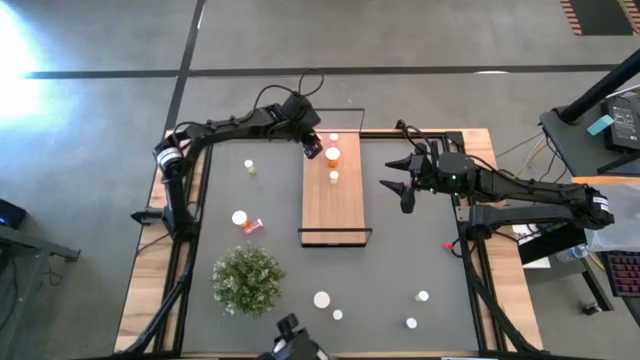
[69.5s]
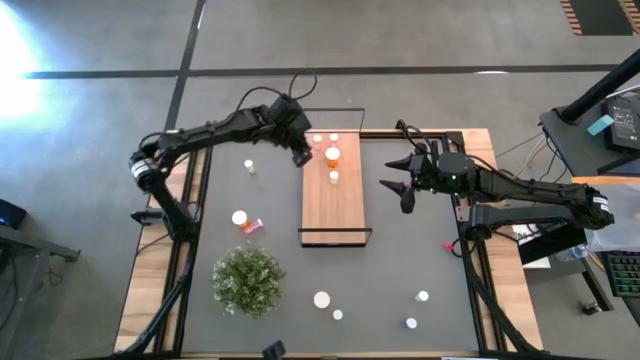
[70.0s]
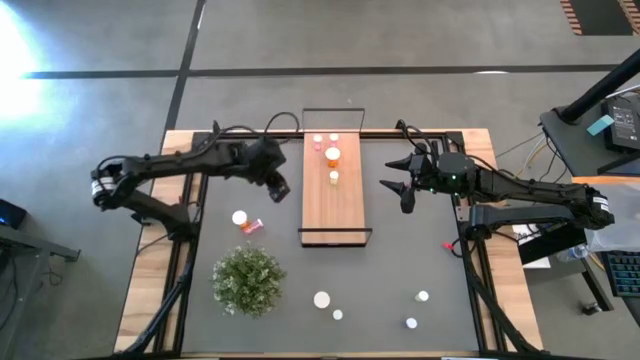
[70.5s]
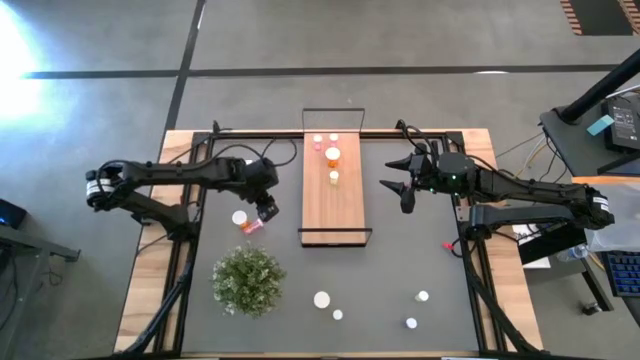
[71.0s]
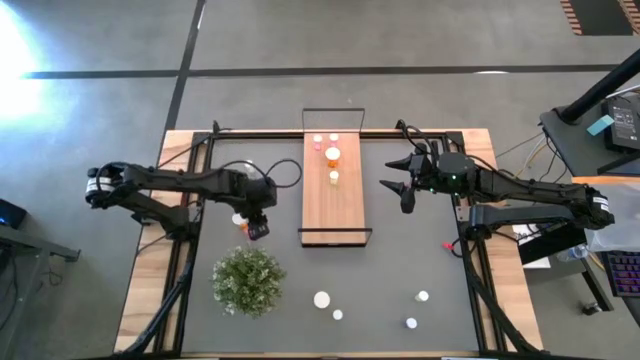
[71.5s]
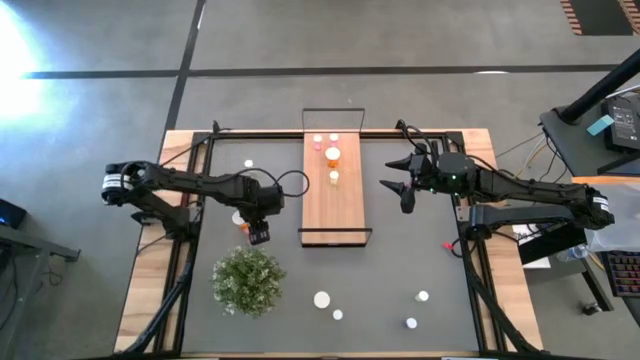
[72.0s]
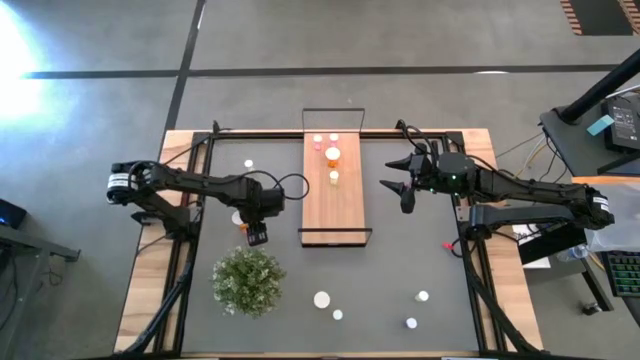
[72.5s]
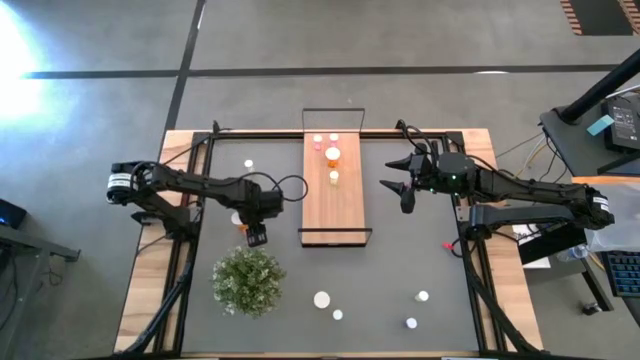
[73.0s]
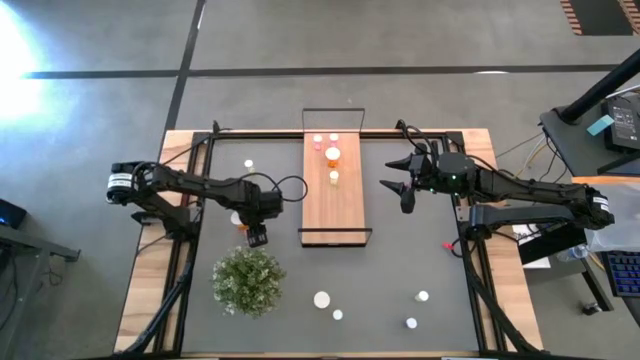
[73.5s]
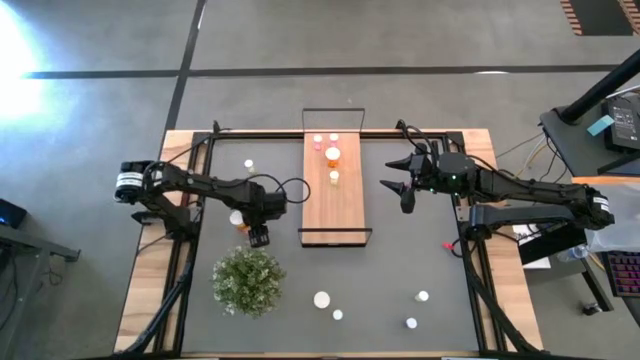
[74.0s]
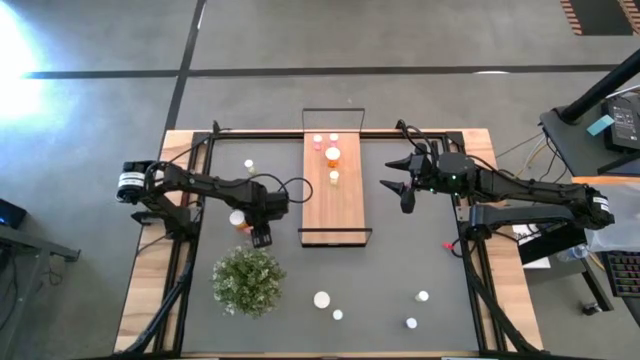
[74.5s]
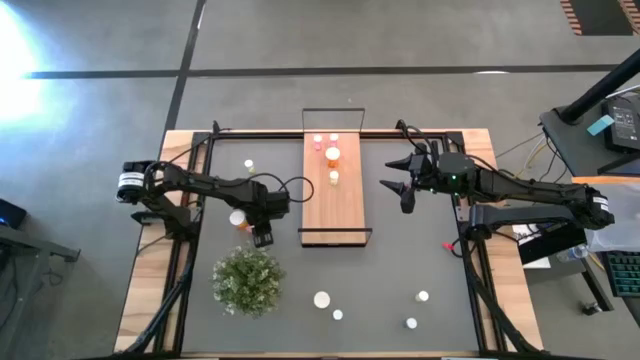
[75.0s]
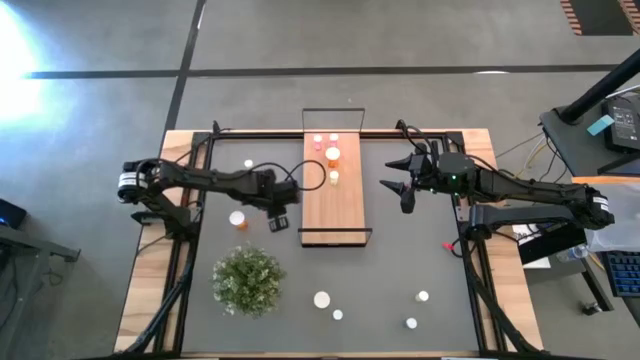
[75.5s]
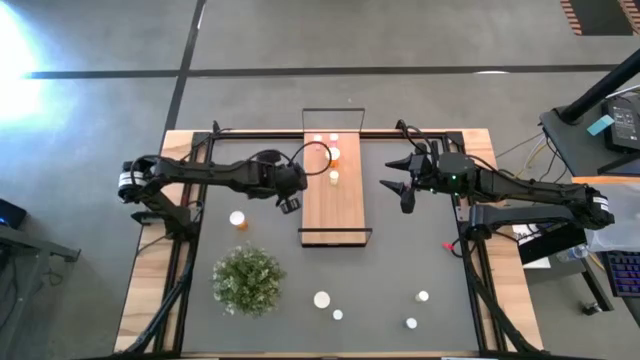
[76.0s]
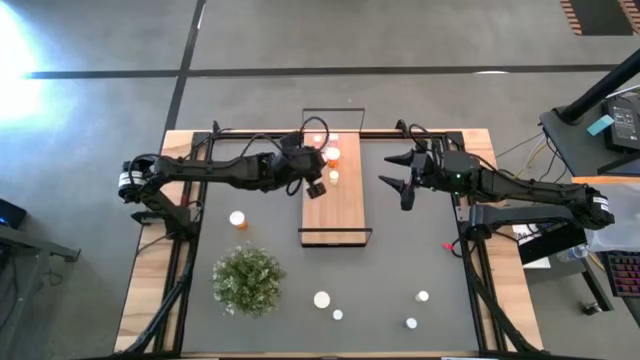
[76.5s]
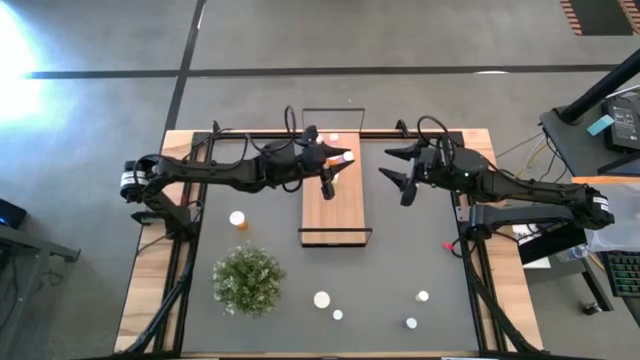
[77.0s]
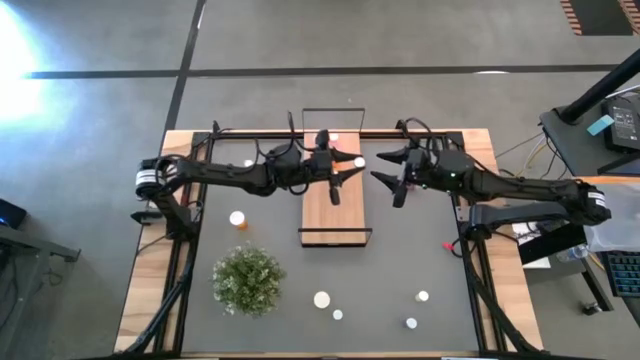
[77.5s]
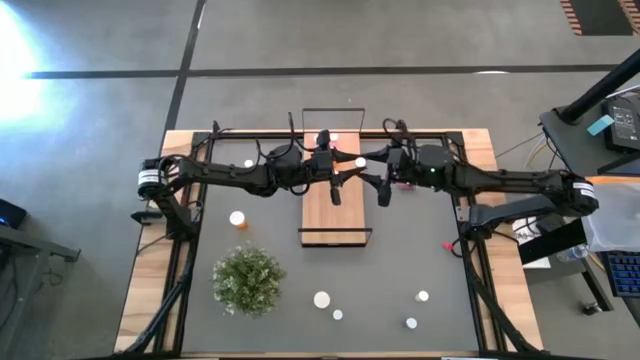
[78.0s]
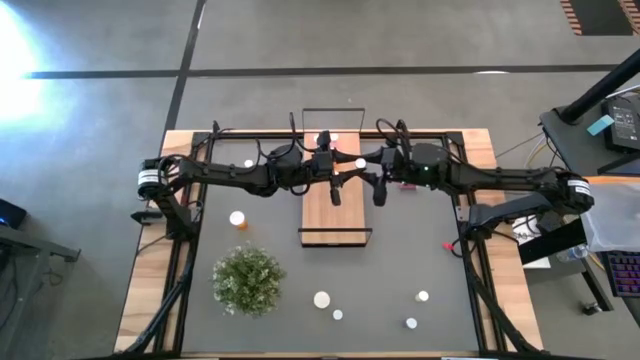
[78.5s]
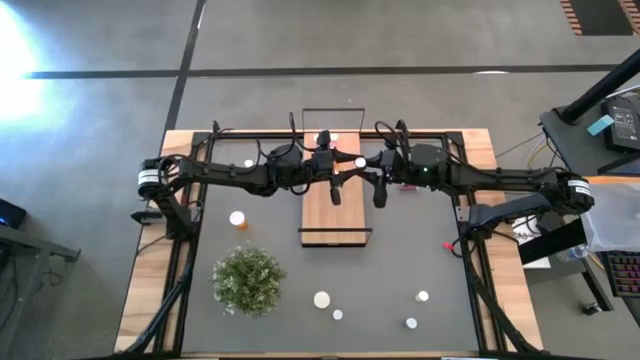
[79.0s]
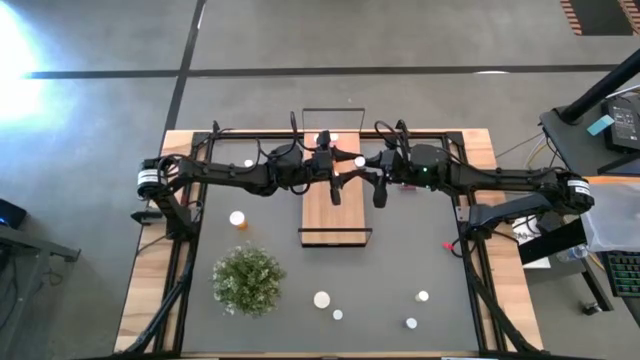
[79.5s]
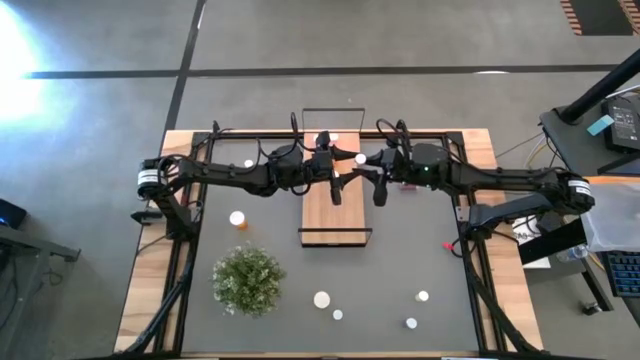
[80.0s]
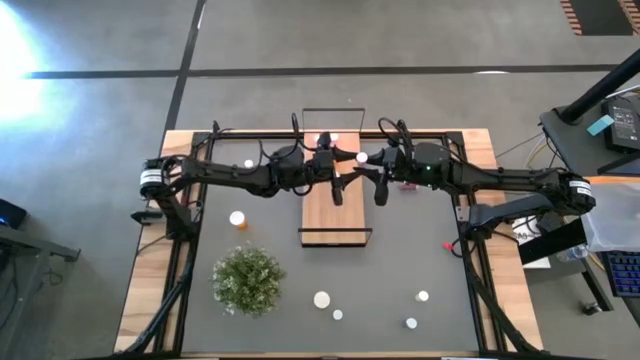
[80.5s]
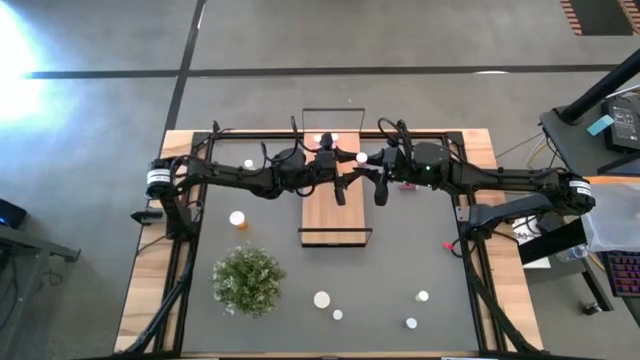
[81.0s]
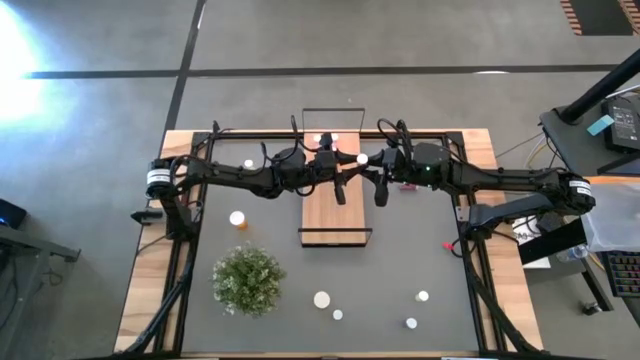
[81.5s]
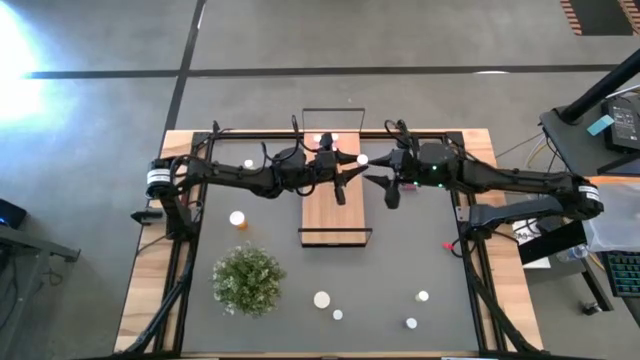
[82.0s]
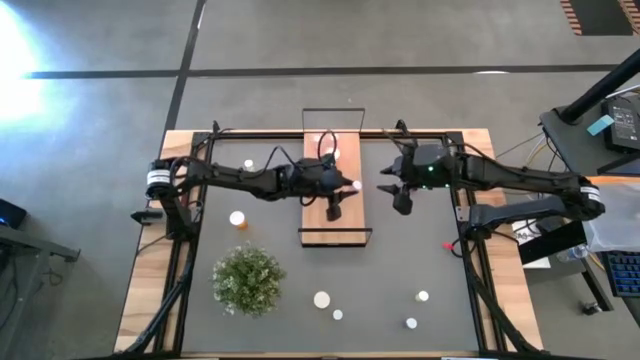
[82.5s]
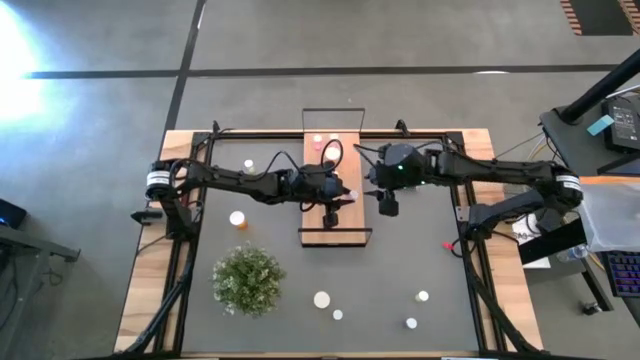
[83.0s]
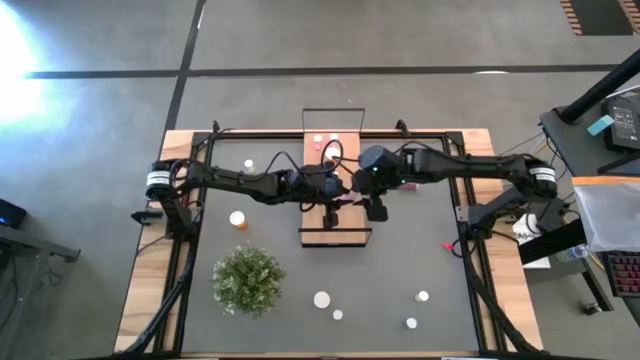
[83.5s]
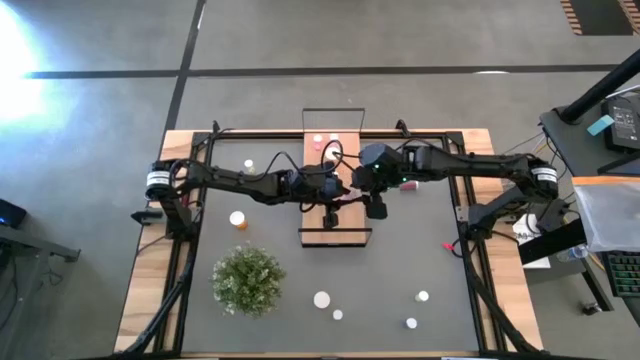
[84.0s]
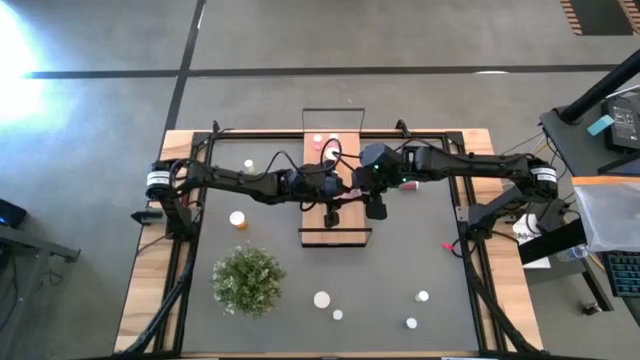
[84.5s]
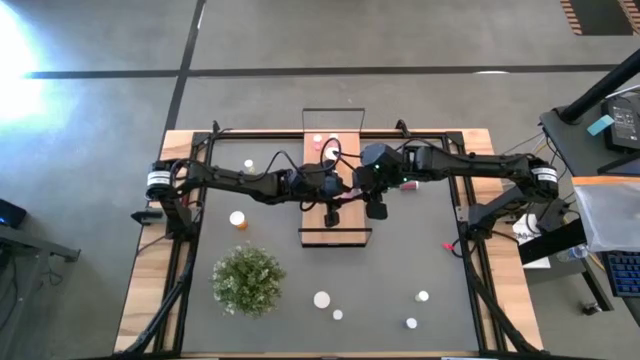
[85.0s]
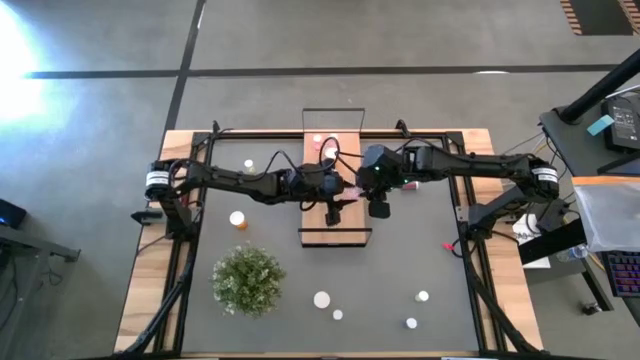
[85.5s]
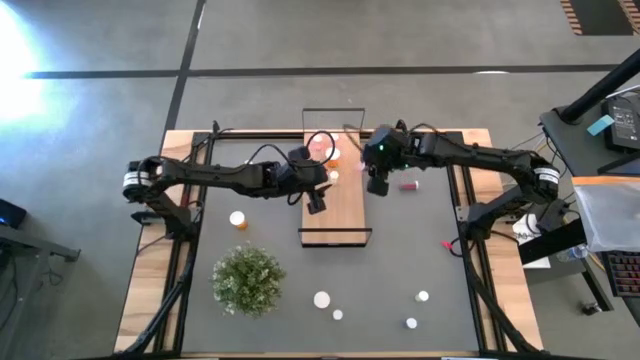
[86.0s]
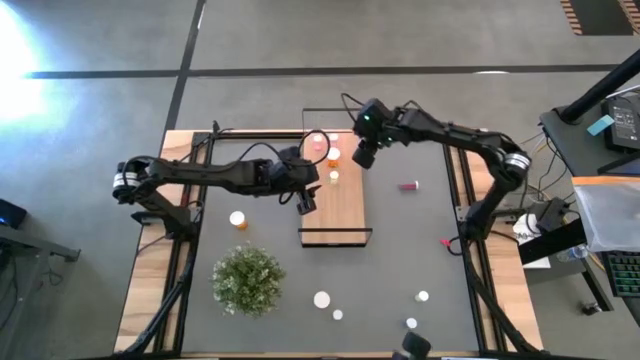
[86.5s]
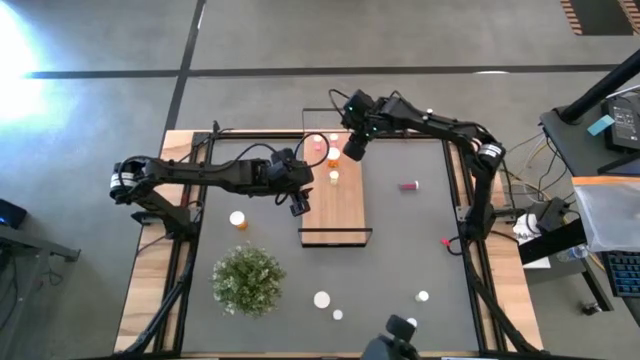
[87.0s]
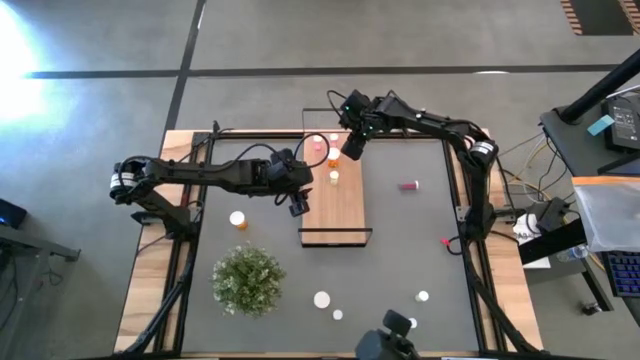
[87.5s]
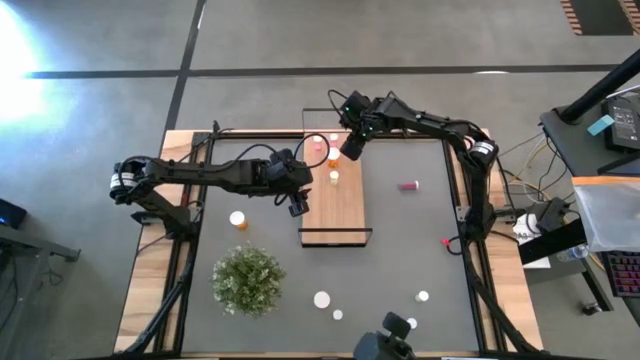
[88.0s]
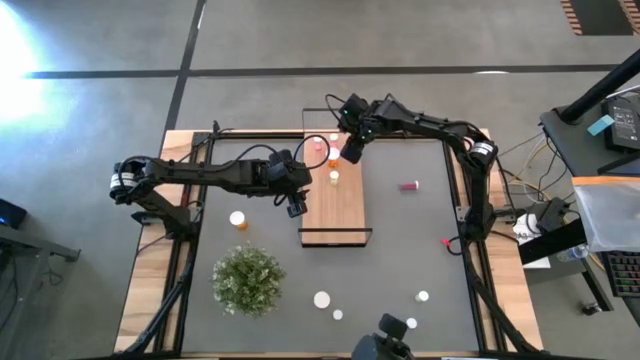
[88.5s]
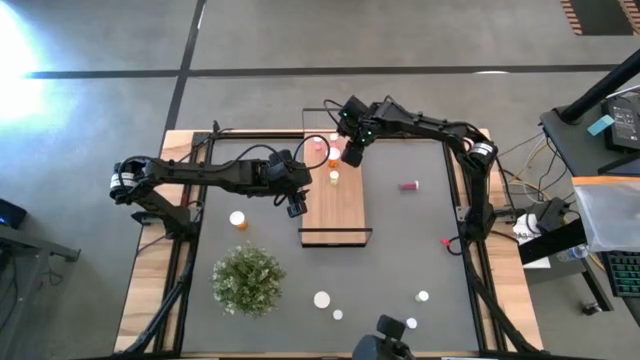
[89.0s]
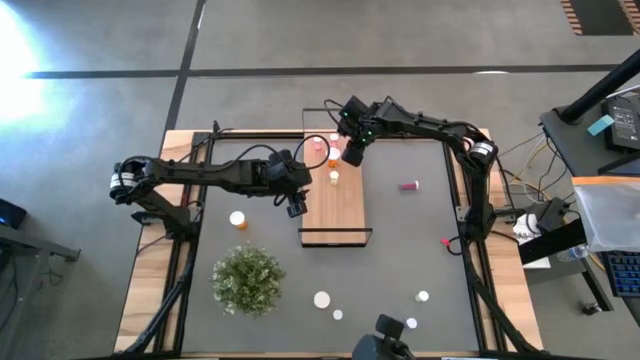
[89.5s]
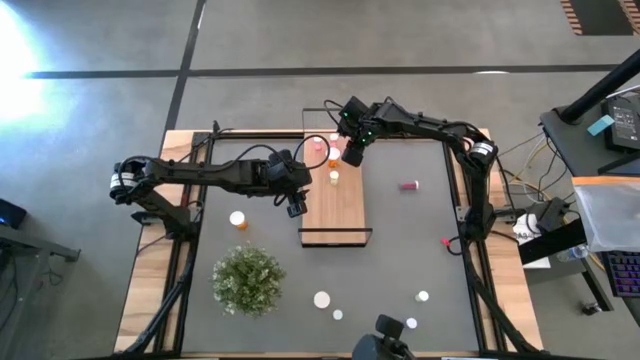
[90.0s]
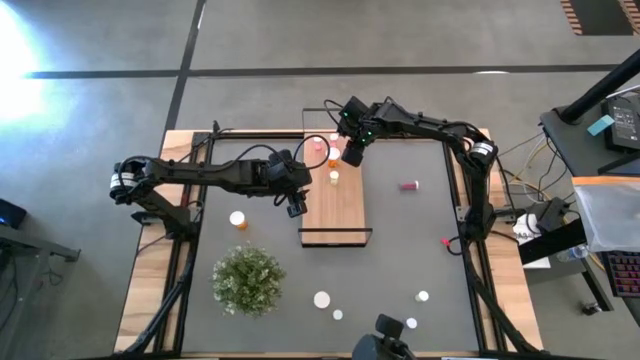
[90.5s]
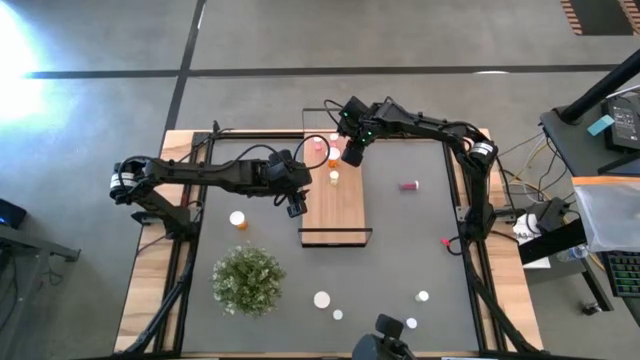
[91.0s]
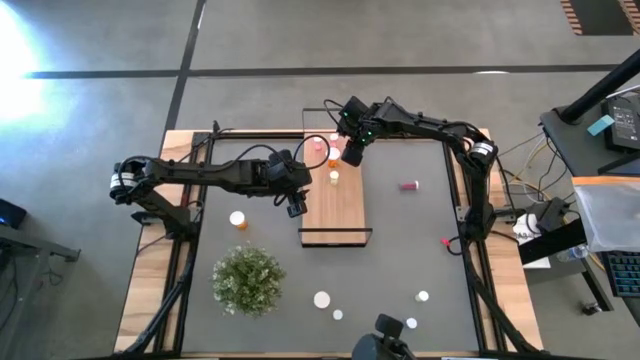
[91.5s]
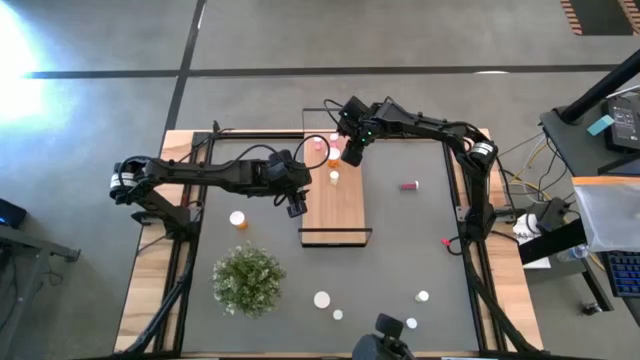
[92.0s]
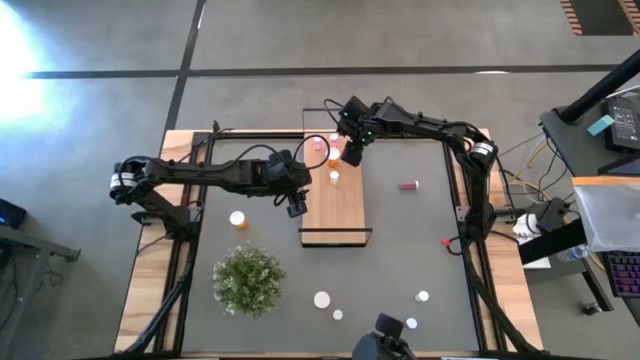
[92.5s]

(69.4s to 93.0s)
Task: Pick and place medicine bottles onto shelf by color
Put the pink pill bottle on the shelf aligned with the other pink pill bottles
